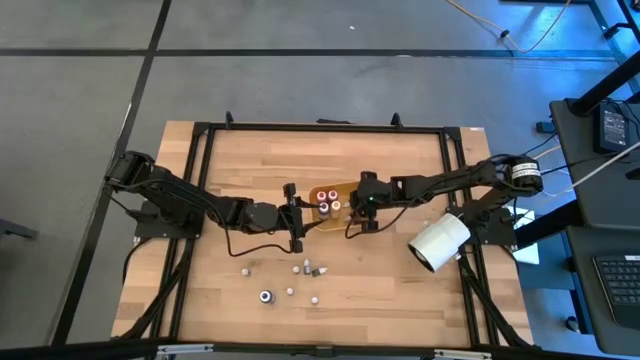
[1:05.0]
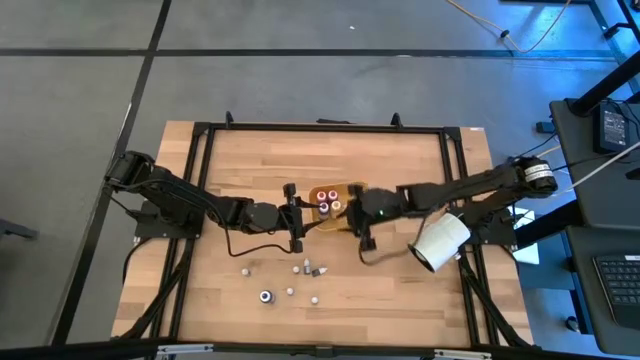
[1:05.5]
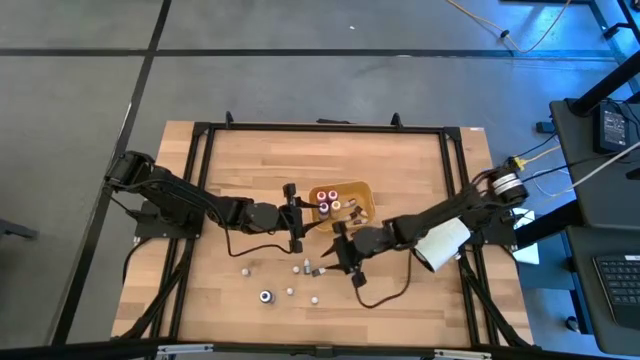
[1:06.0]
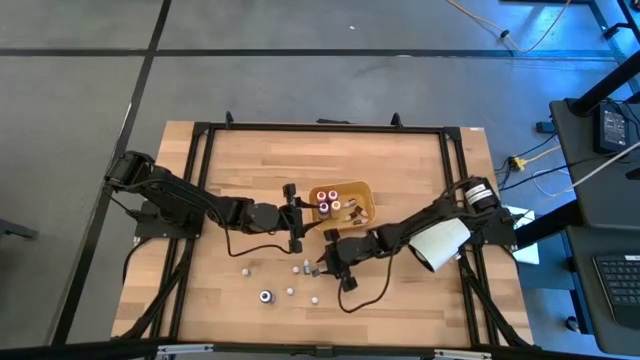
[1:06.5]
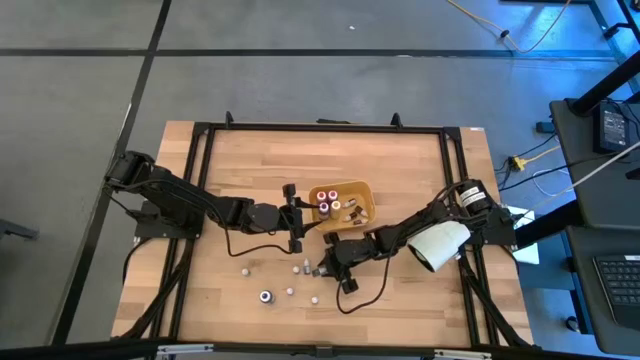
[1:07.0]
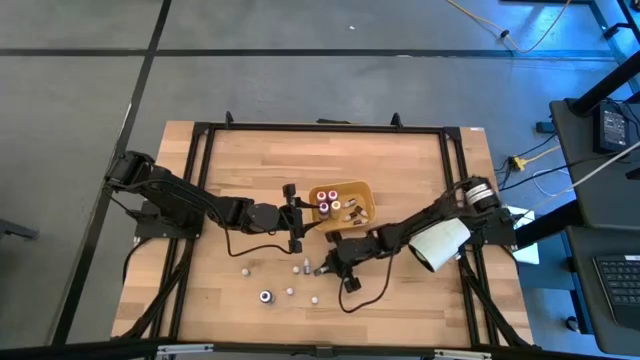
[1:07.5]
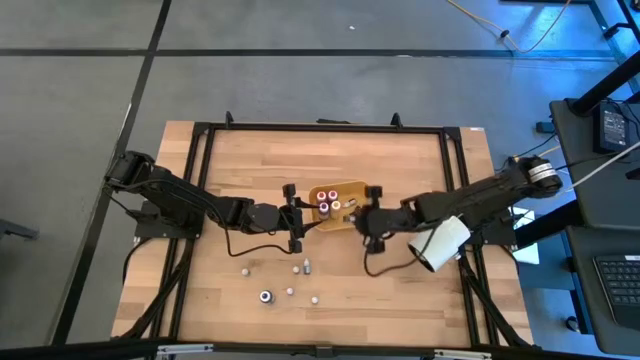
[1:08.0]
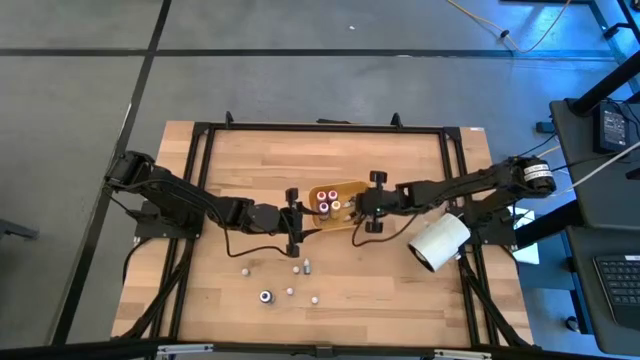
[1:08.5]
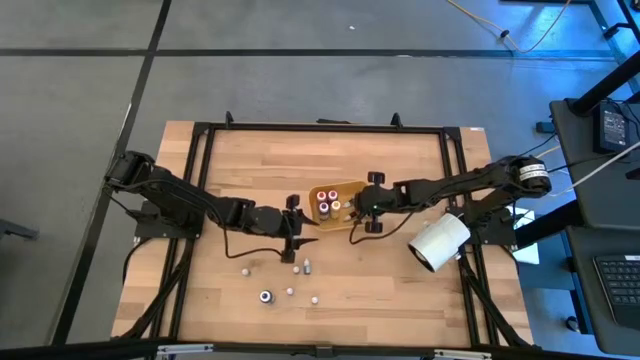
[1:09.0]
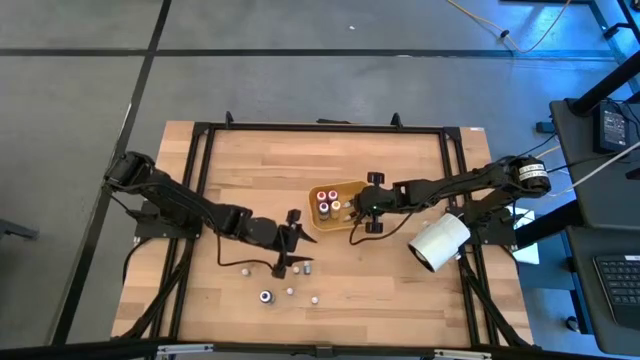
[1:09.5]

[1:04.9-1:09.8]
Task: Pick & Place food coloring
Put the small green food coloring bottle into the yellow bin

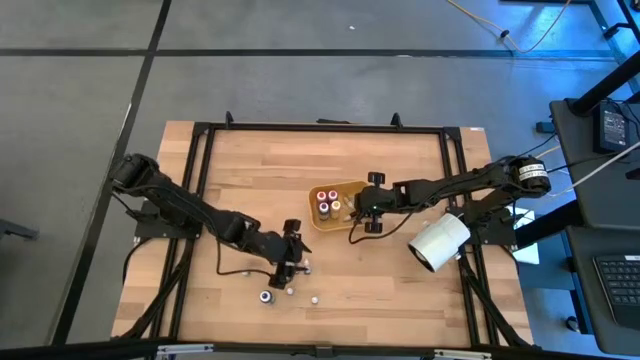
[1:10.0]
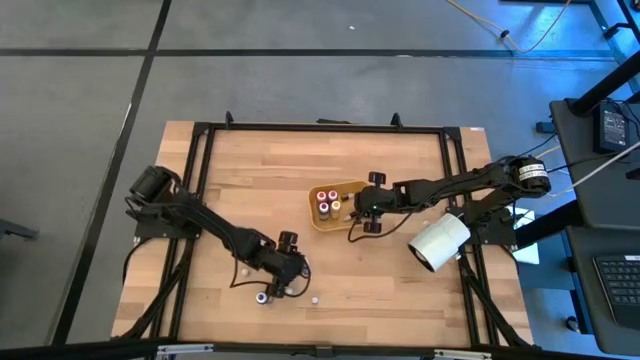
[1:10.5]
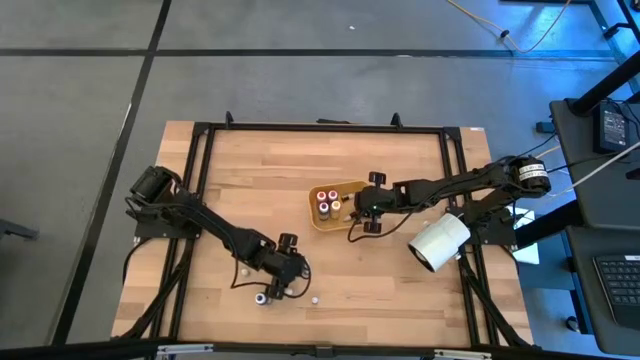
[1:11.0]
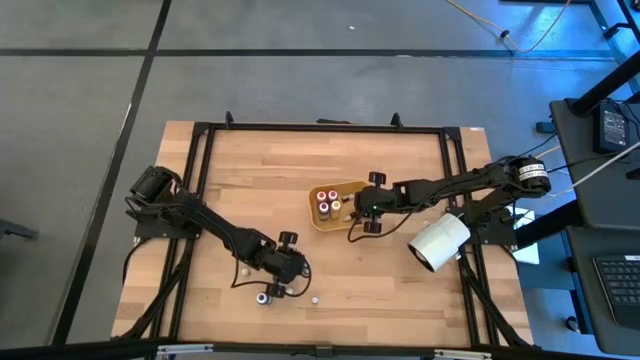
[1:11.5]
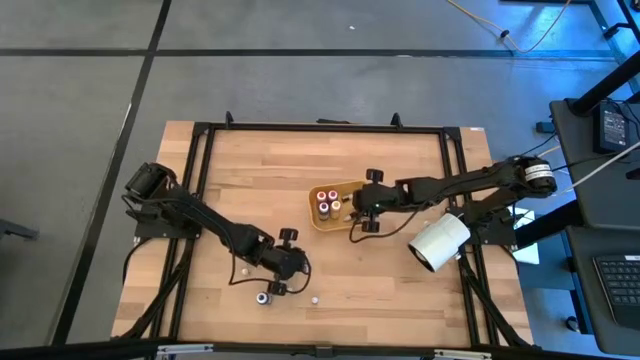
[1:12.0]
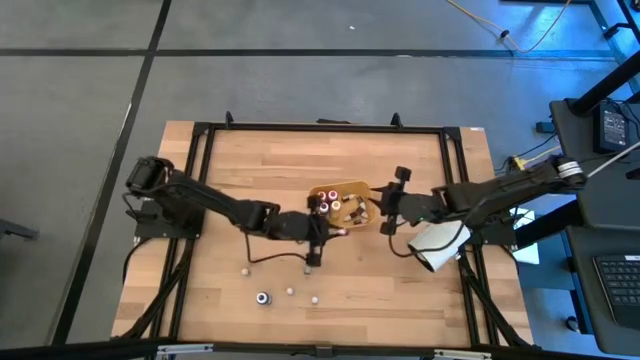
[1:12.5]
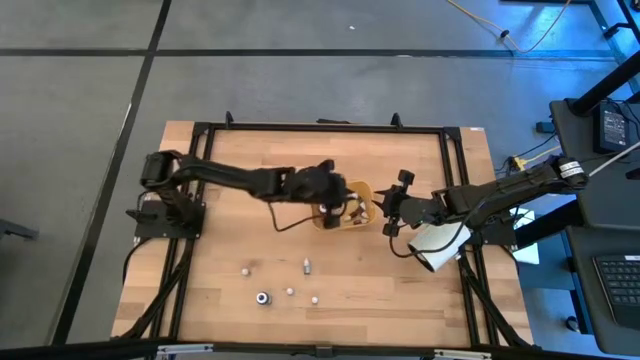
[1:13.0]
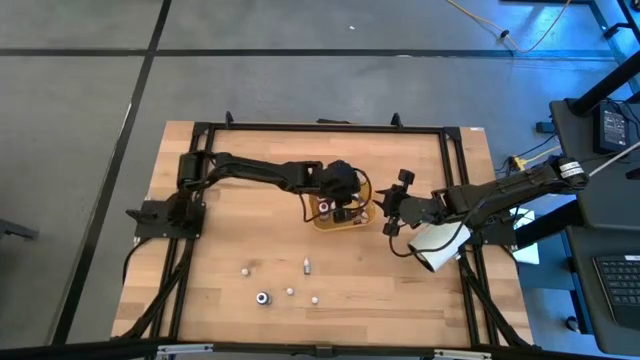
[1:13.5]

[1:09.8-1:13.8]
Put the small black food coloring bottle into the yellow bin

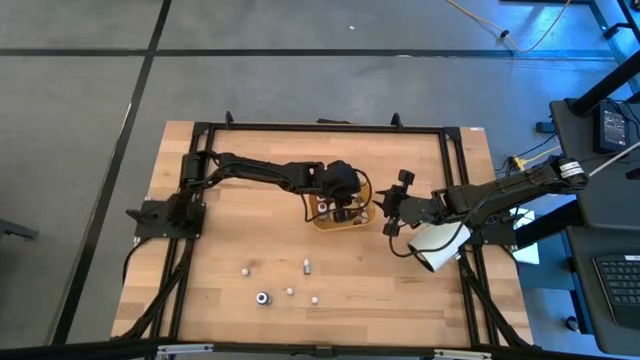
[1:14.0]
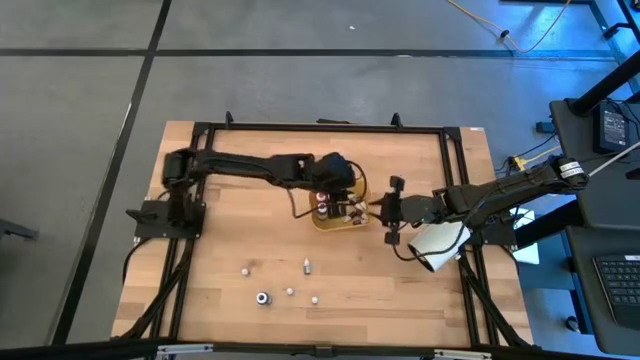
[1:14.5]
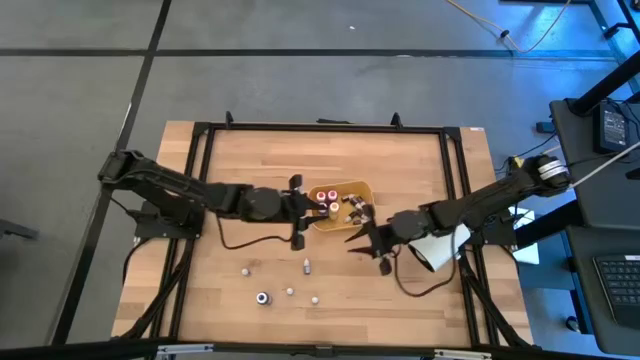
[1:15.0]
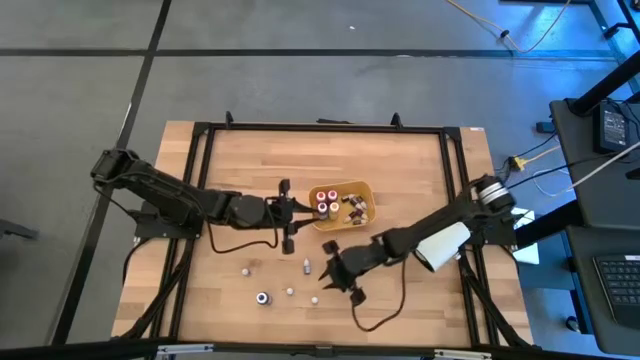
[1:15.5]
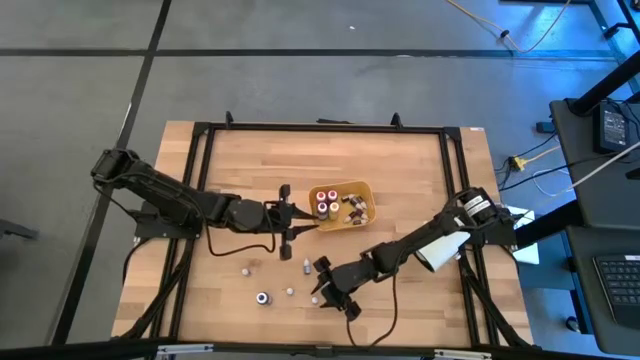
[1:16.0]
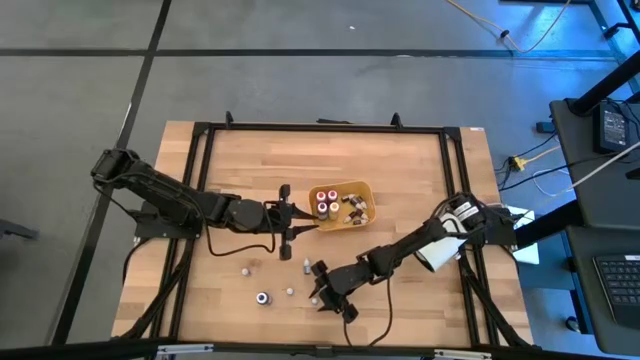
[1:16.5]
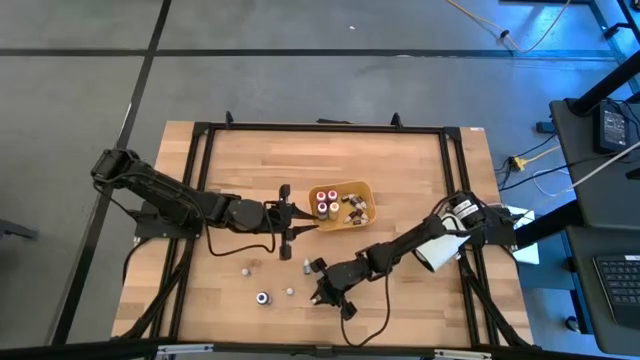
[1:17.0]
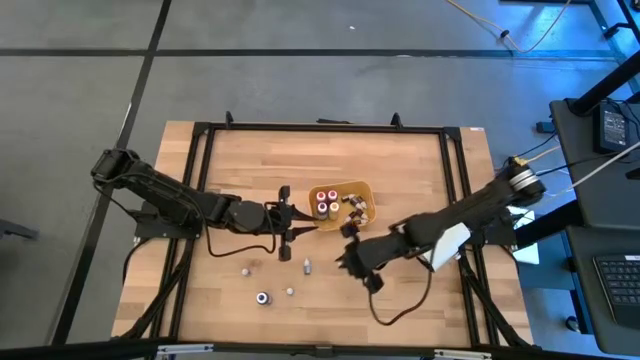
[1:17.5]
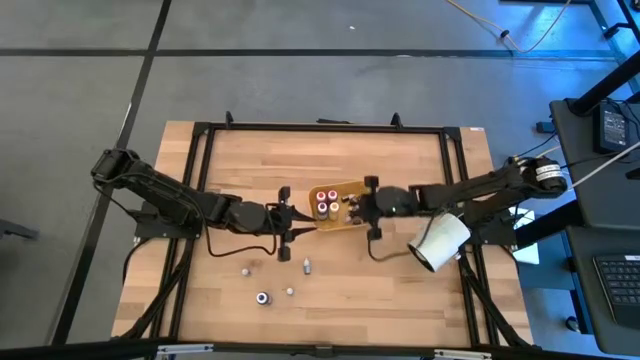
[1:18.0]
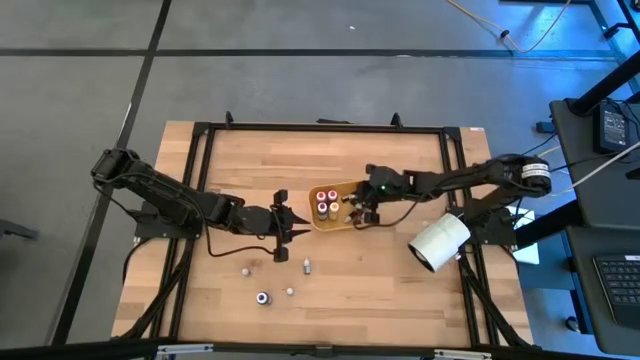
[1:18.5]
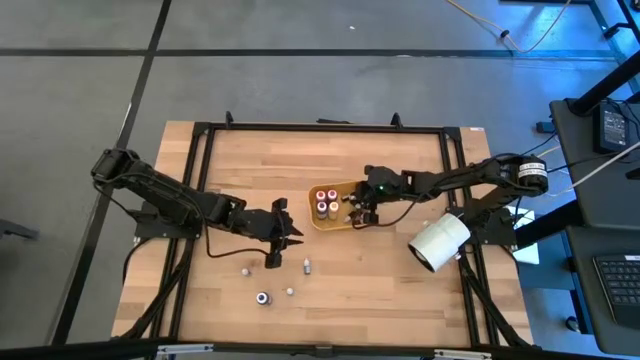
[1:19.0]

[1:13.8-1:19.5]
Put the small brown food coloring bottle into the yellow bin

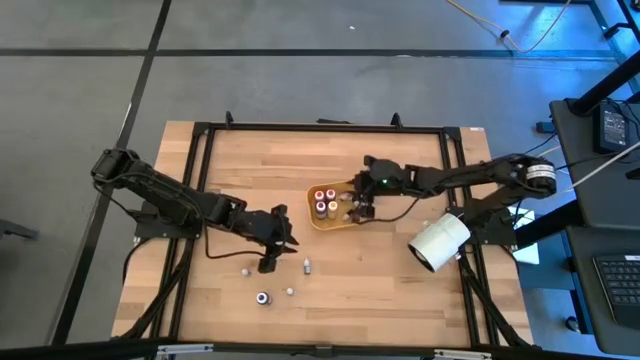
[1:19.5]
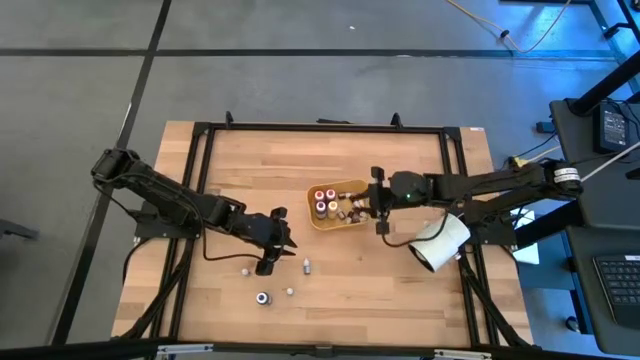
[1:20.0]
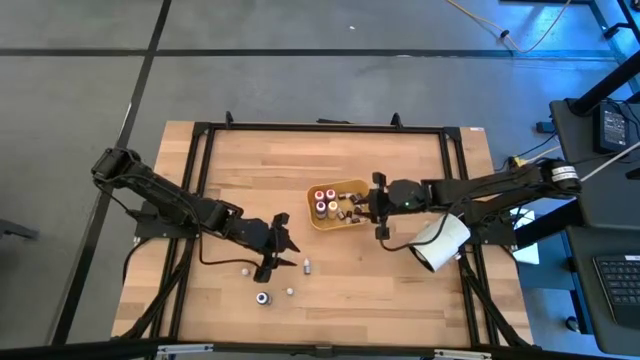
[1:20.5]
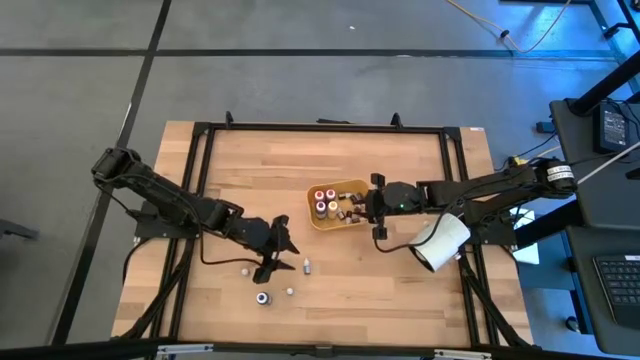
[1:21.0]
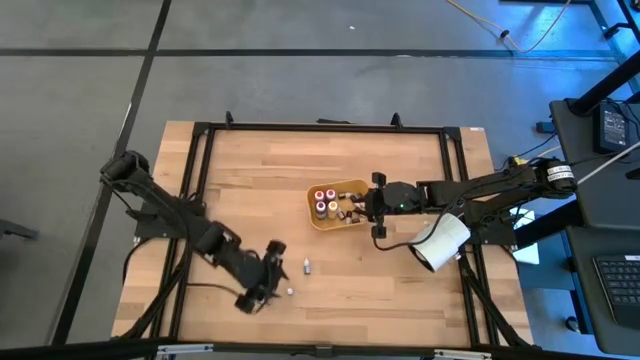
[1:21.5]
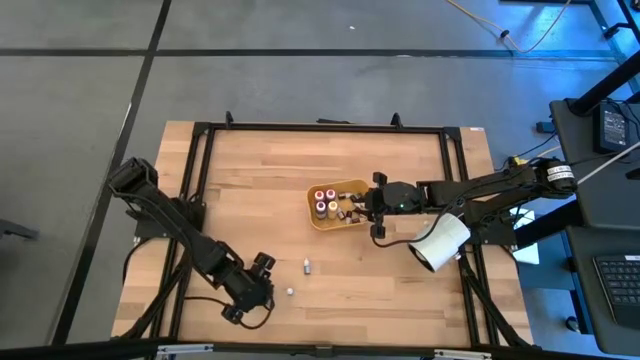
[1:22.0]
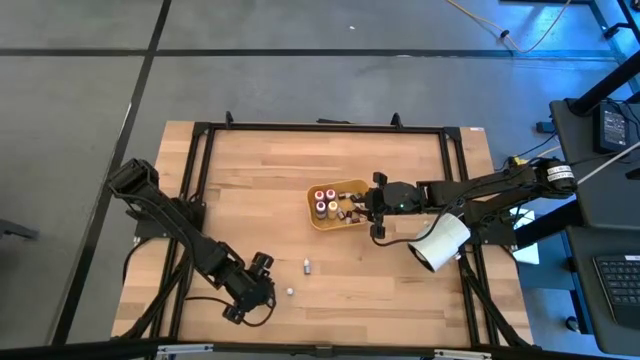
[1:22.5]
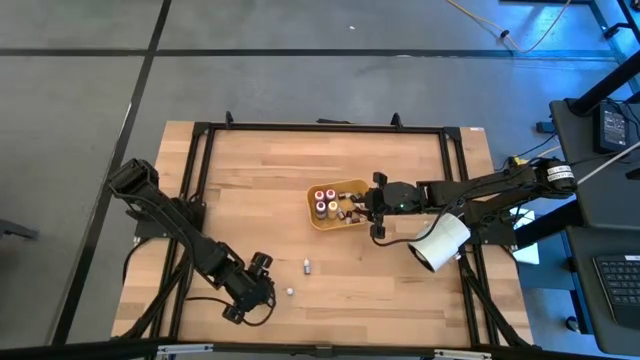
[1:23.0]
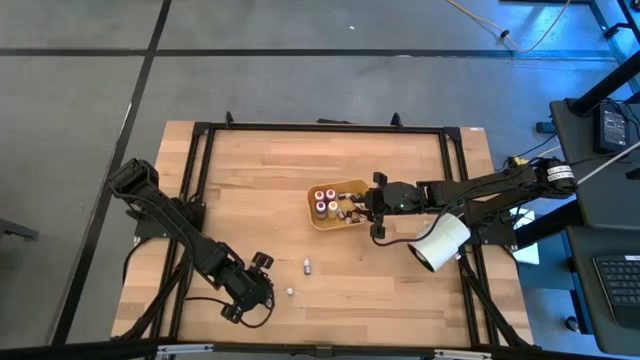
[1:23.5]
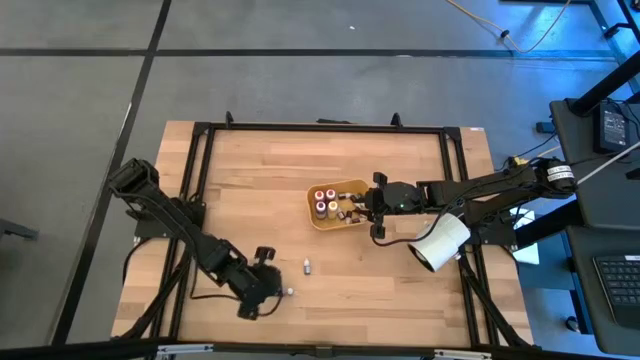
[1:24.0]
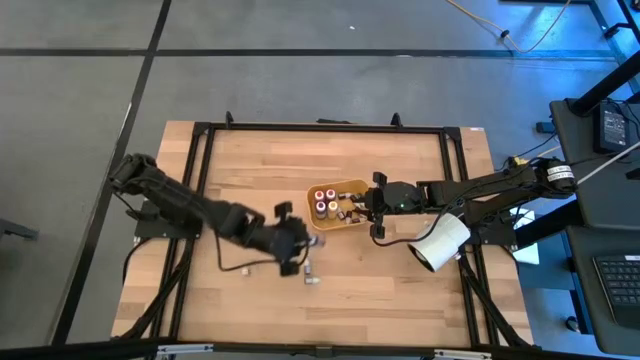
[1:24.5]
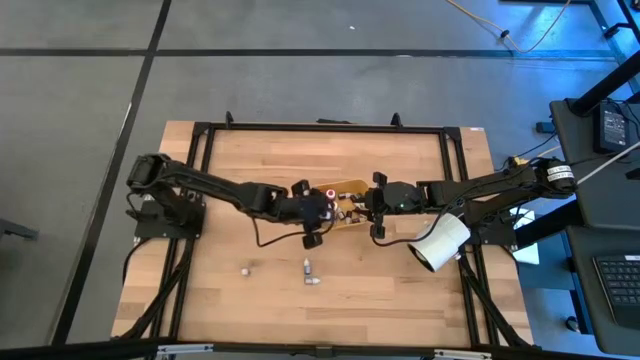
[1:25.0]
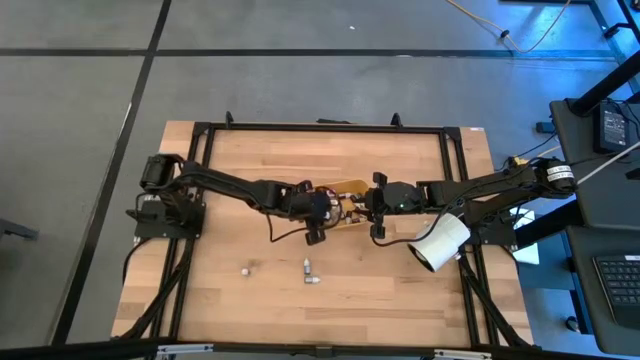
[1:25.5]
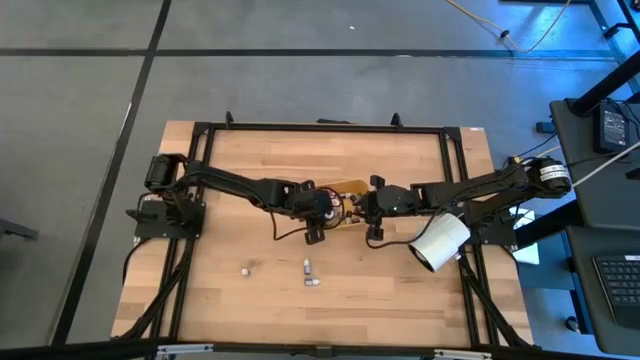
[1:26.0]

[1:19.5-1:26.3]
Put the big blue food coloring bottle into the yellow bin
